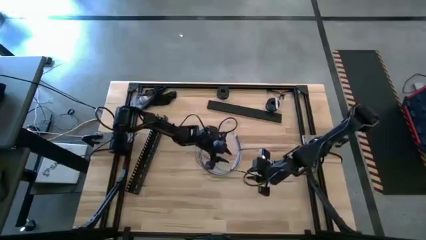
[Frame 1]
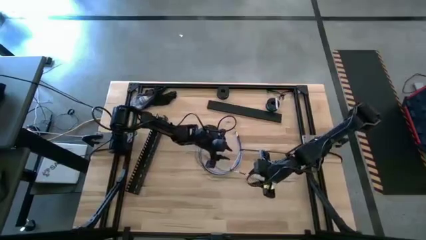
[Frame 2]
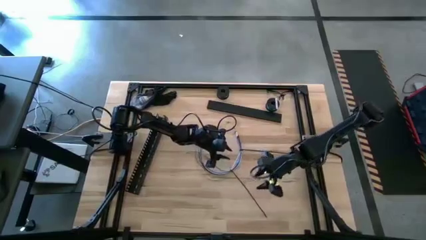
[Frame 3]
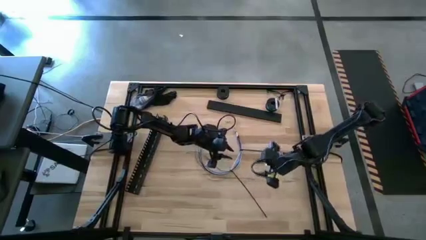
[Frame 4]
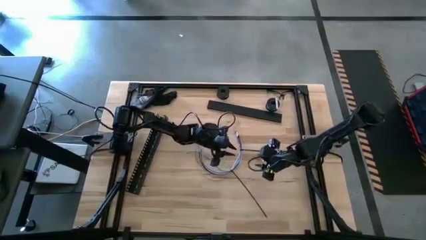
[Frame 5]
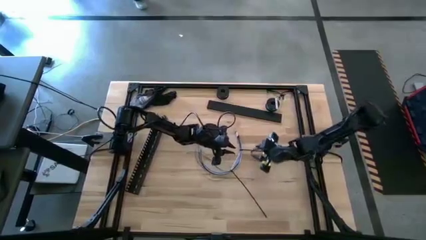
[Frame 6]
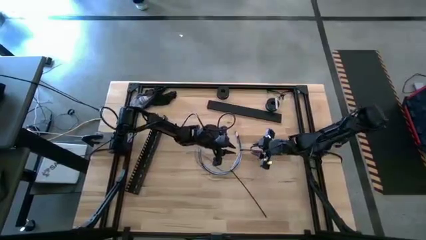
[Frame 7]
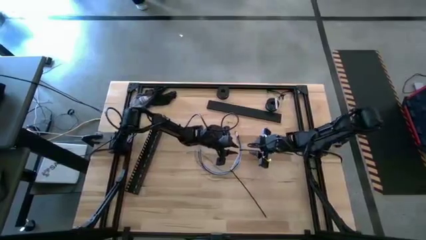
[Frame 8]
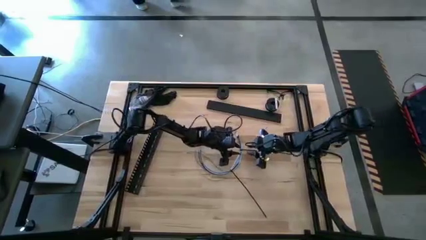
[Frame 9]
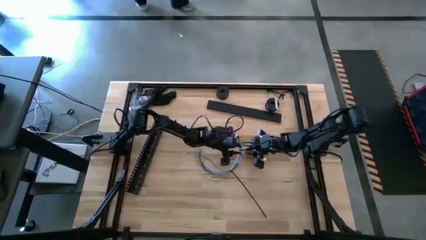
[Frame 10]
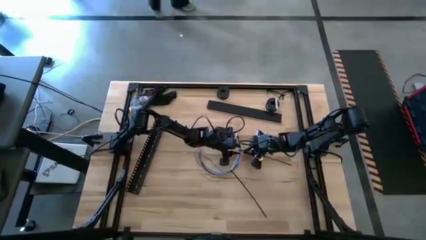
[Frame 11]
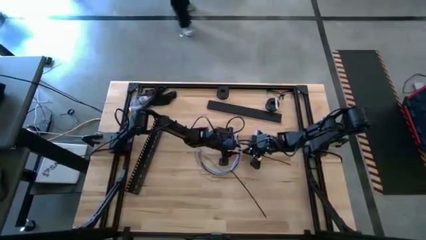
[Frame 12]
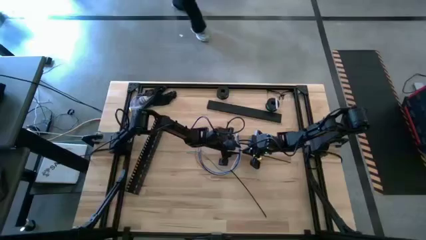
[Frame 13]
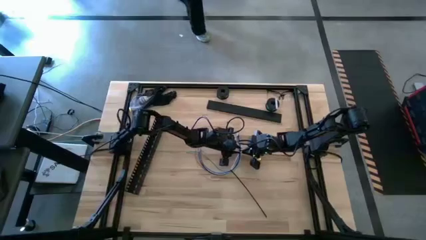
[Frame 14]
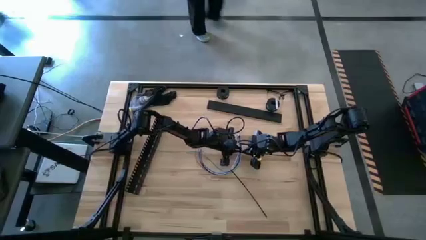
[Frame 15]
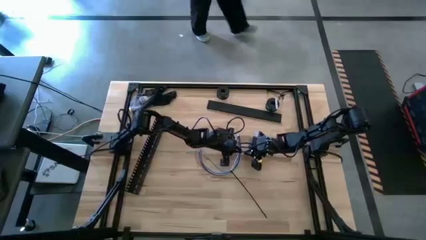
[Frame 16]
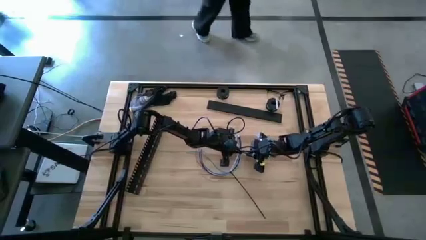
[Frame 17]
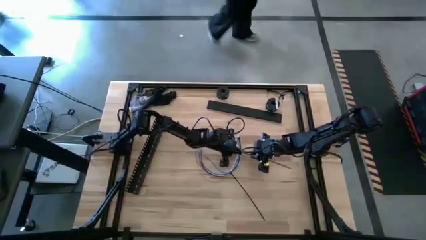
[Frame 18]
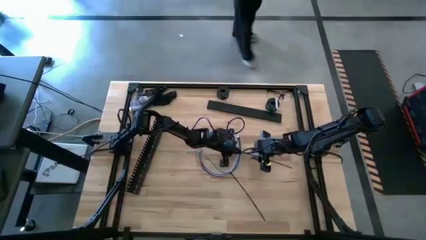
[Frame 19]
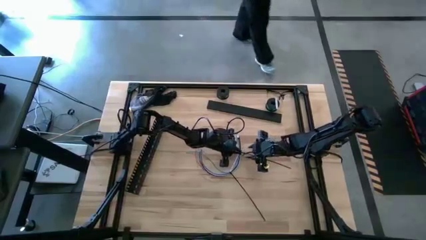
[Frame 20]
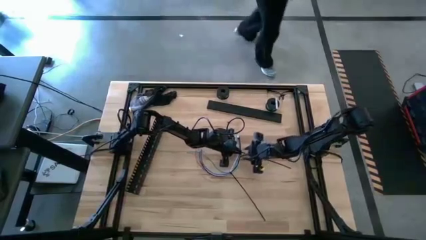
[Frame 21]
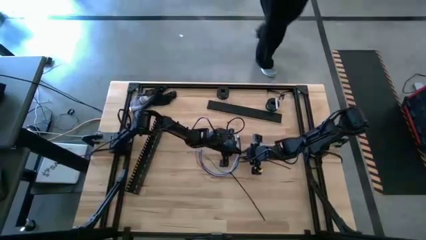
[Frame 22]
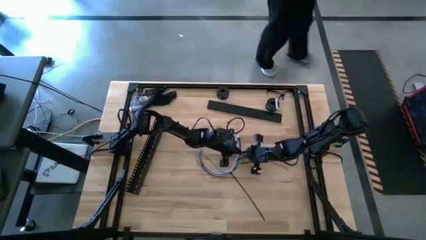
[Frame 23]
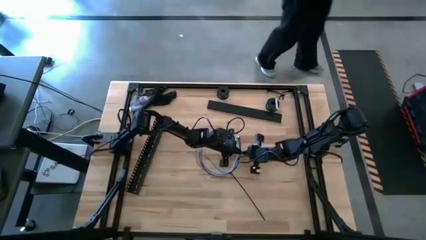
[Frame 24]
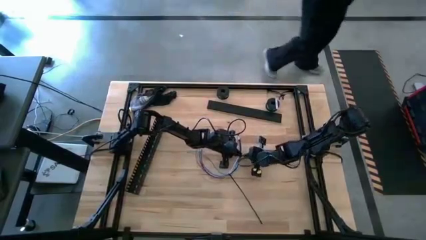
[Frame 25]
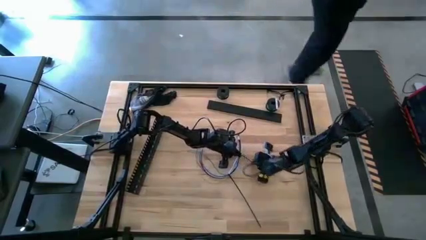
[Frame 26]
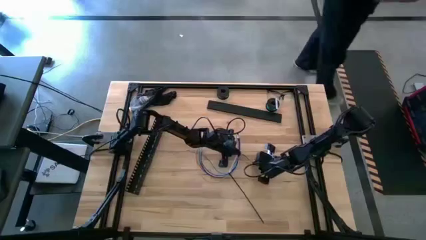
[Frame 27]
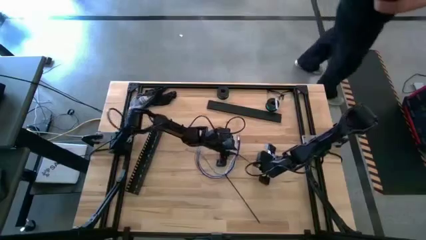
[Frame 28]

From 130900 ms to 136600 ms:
Task: Ziptie cables
Insert the right cable zip tie into the cable wires

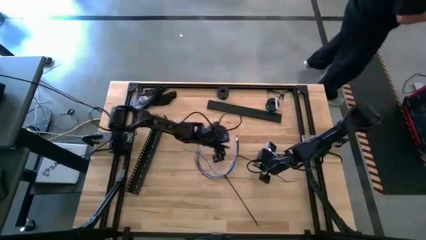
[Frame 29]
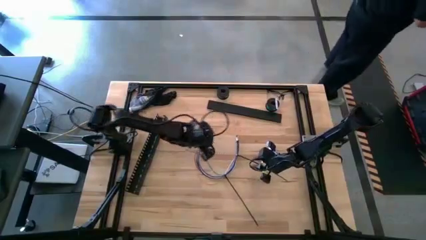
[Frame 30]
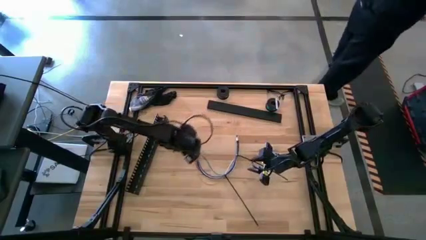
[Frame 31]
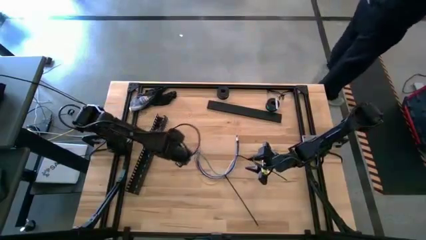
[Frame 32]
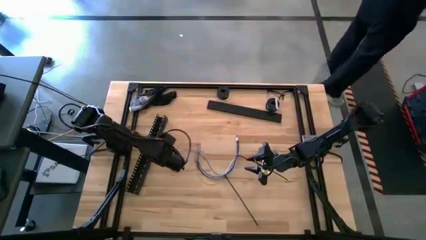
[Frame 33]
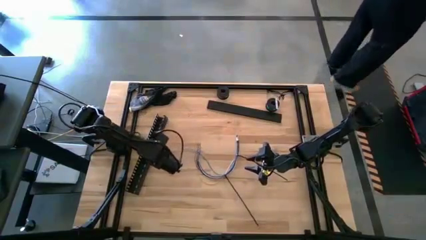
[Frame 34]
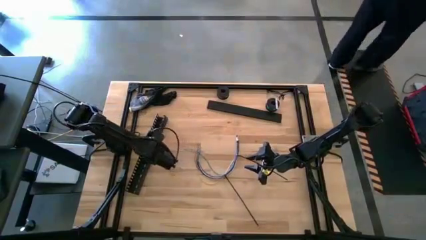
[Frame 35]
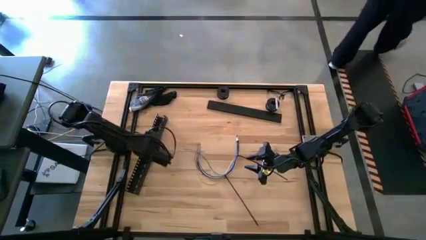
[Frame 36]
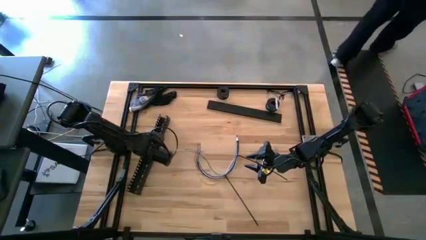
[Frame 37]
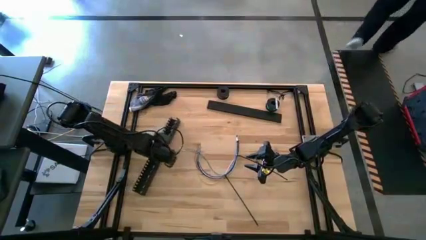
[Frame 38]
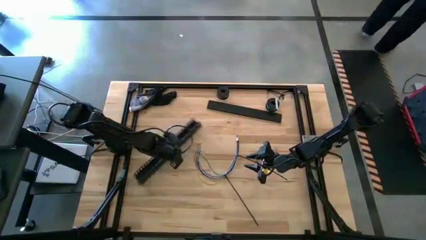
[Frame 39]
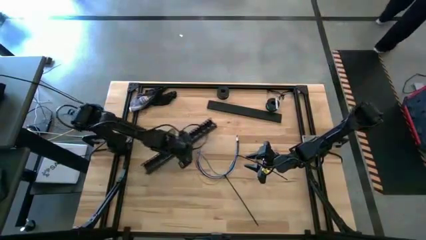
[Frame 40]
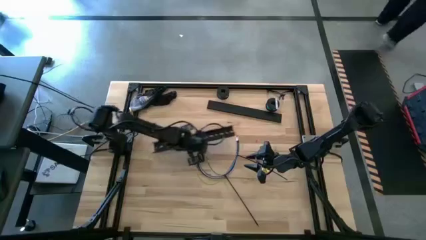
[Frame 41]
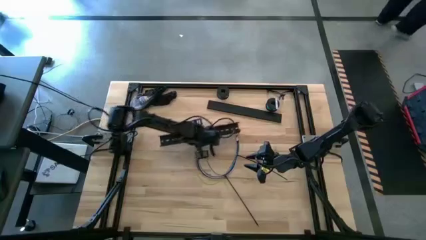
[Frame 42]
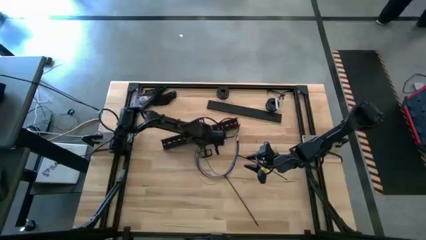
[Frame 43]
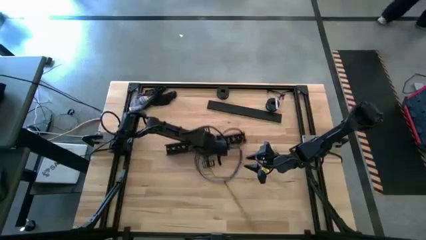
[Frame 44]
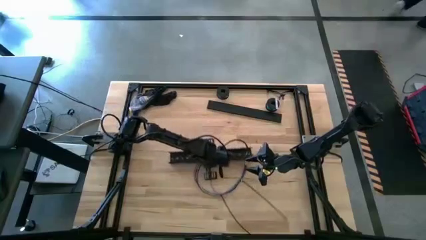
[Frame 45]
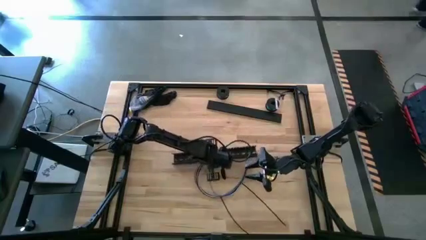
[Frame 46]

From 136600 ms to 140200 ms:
Move the black cable duct to the center of the table

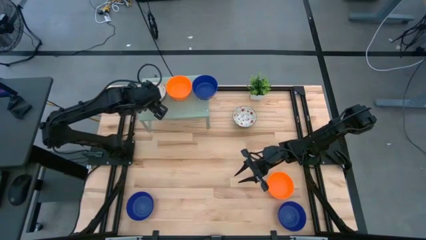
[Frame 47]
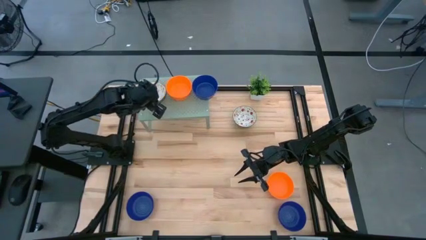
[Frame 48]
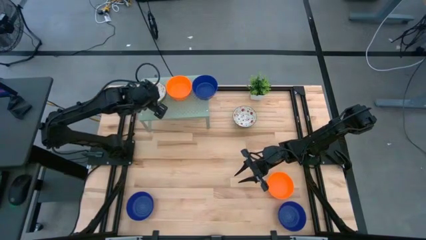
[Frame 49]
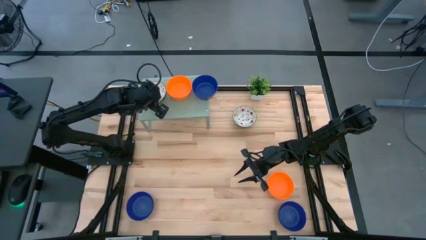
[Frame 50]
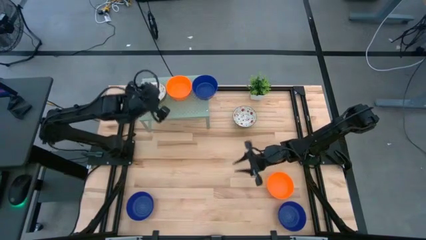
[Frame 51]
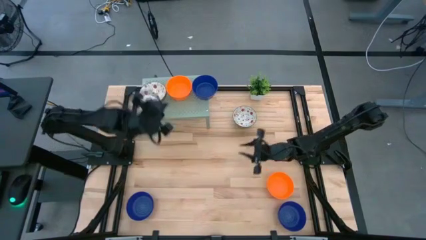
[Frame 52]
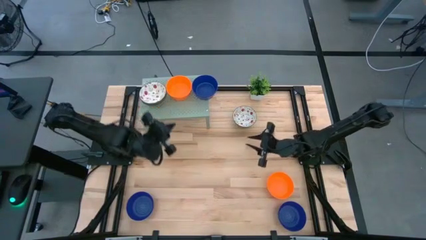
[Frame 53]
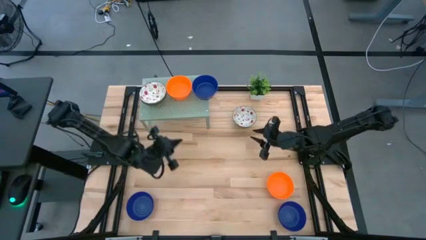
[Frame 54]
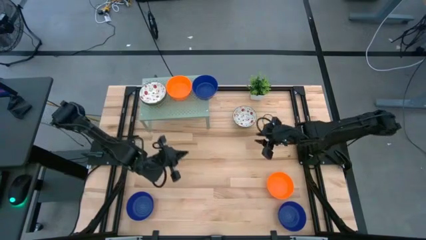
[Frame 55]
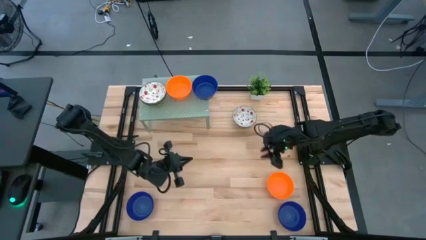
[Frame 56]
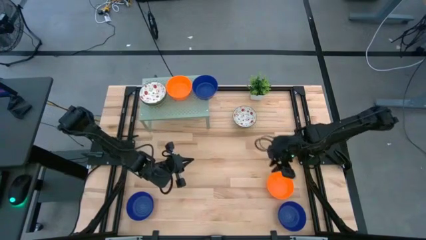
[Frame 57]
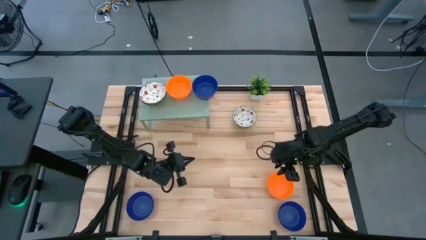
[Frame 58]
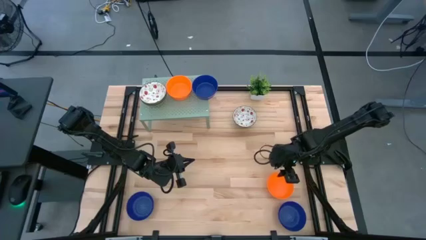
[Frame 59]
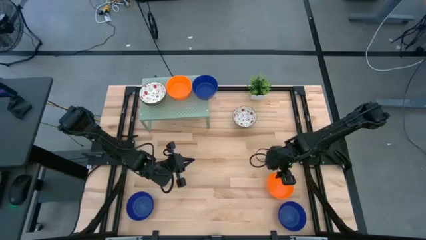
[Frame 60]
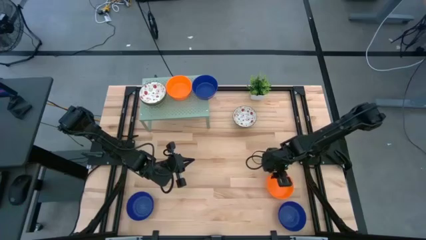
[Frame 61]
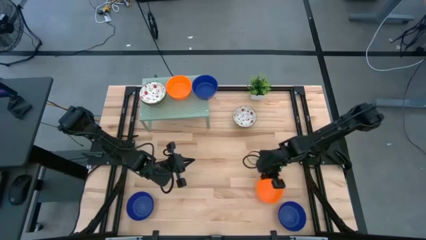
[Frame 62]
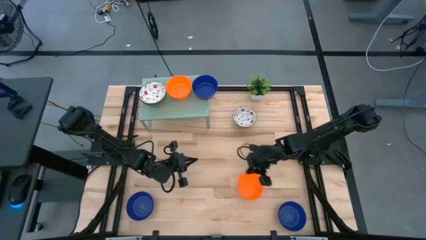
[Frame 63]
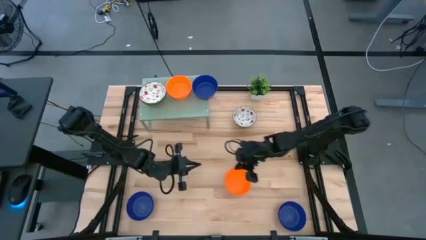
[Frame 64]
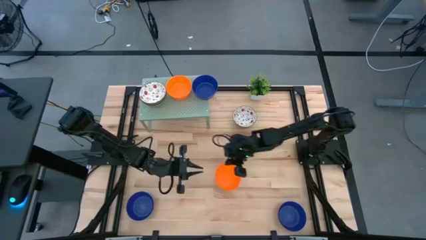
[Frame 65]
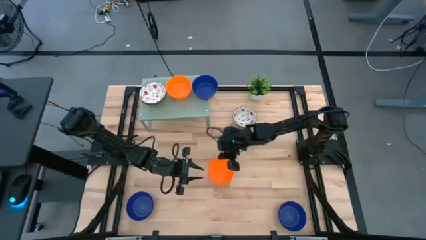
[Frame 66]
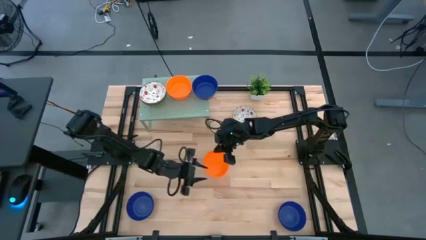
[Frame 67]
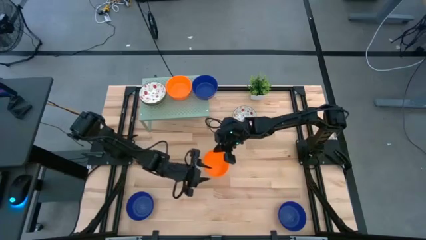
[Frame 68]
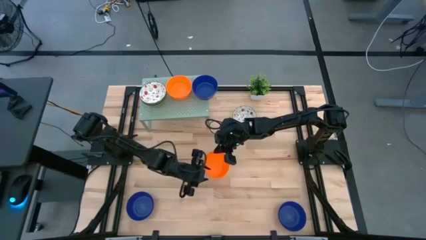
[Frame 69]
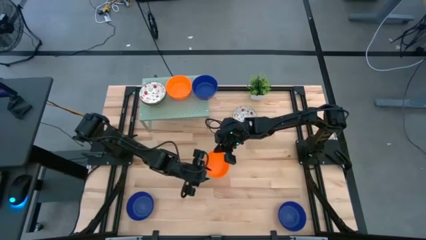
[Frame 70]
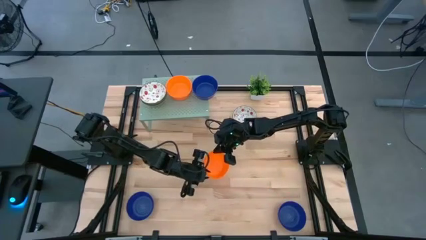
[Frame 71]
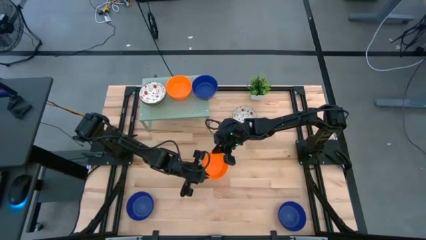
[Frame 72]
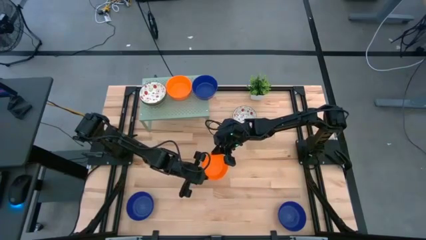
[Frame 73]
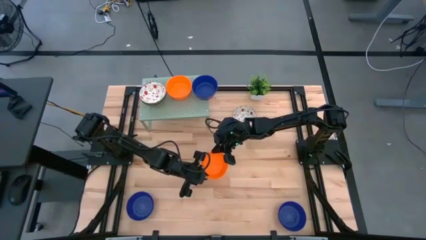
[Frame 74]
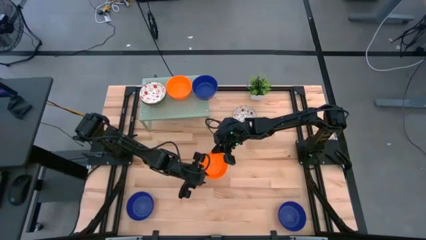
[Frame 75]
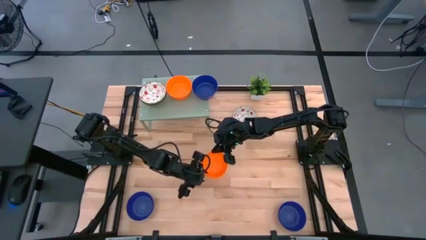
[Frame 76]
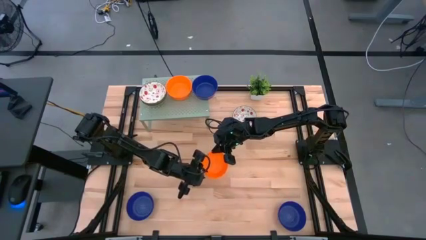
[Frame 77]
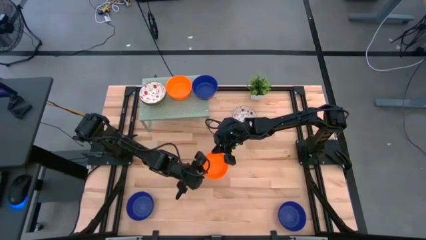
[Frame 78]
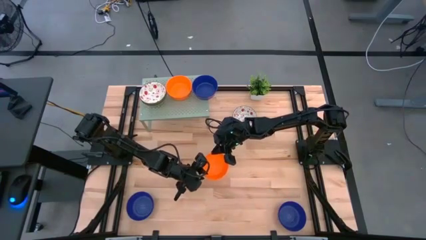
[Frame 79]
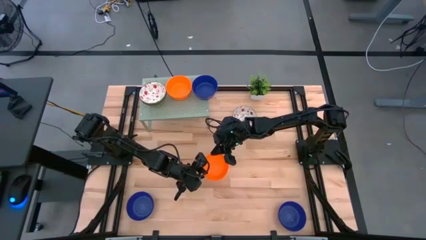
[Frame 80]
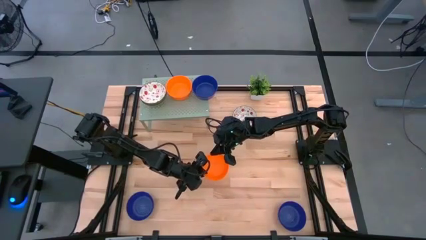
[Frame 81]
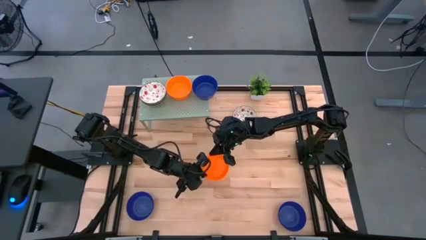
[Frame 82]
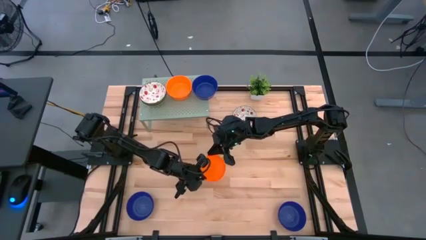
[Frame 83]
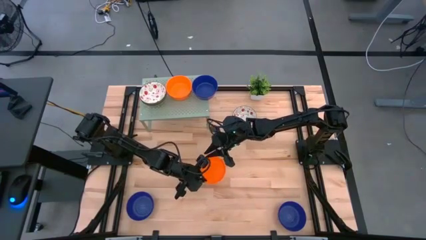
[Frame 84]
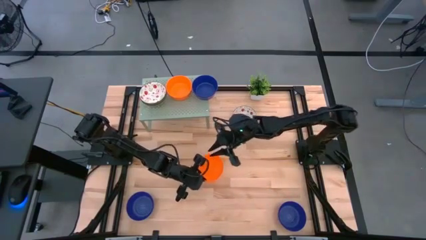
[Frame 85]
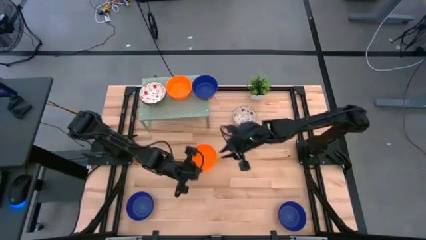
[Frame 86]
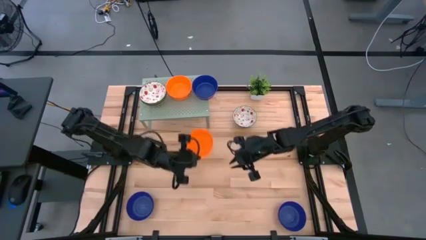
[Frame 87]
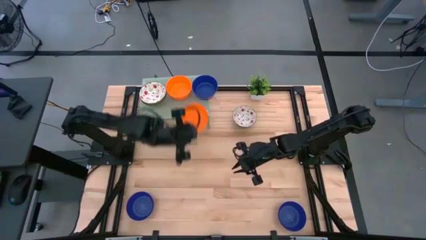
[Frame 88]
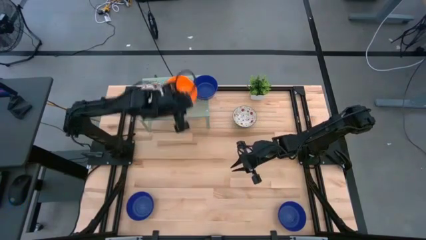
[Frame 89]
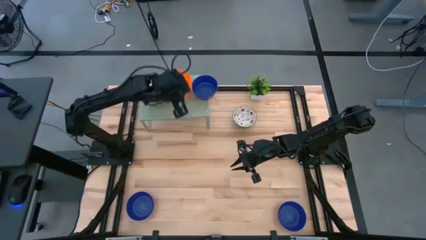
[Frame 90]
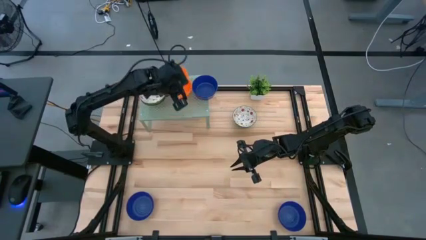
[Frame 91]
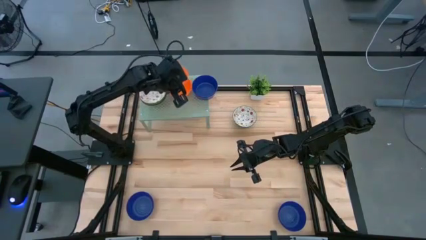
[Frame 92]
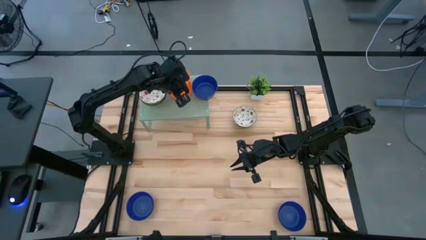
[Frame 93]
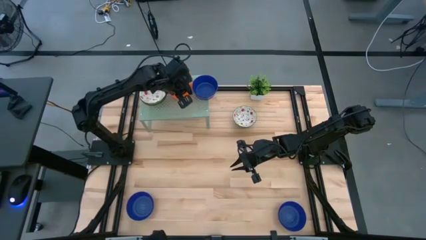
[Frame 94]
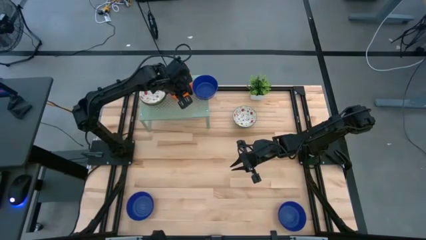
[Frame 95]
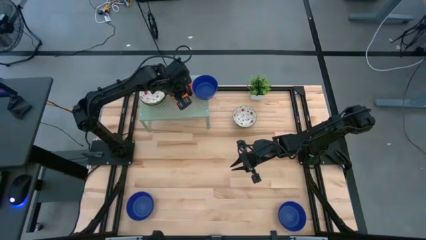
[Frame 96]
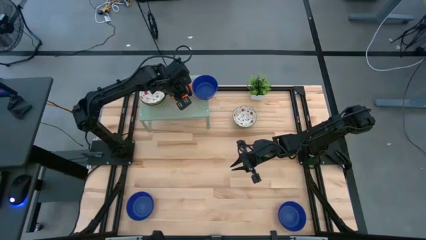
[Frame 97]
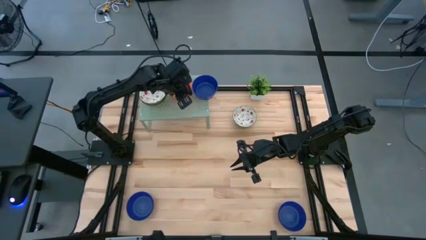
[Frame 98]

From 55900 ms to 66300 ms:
Task: Pick & Place Mini bowls
Stack the orange bowl on top of the other orange bowls on the shelf
